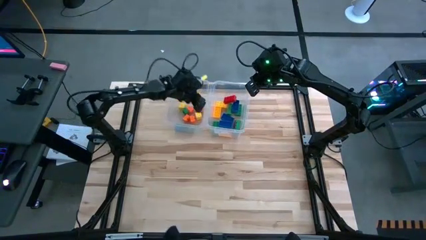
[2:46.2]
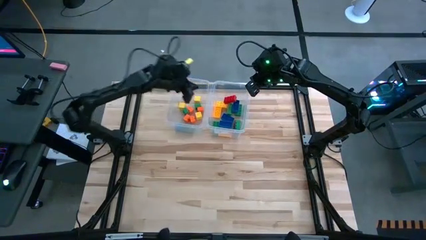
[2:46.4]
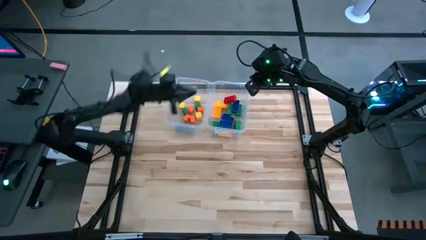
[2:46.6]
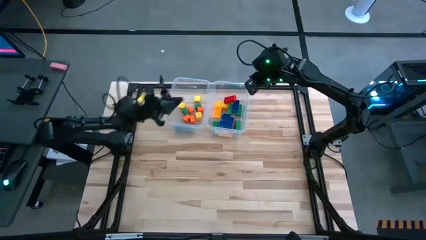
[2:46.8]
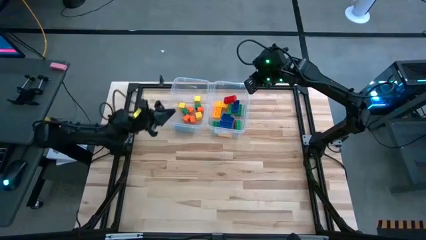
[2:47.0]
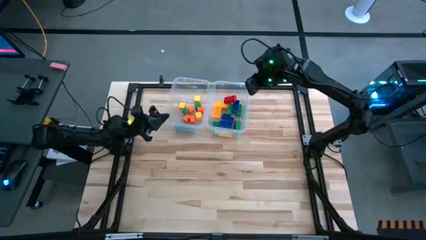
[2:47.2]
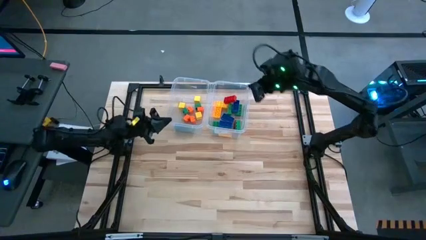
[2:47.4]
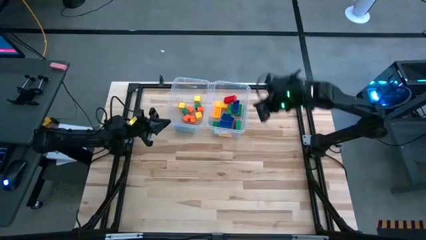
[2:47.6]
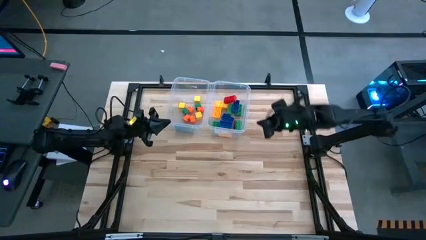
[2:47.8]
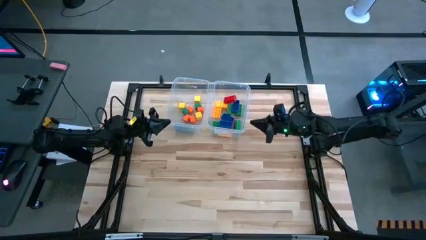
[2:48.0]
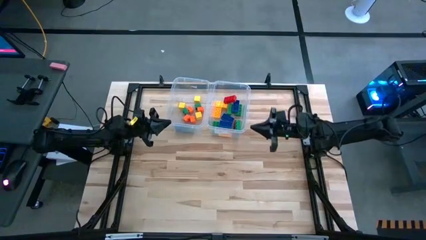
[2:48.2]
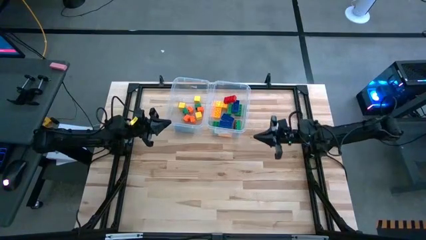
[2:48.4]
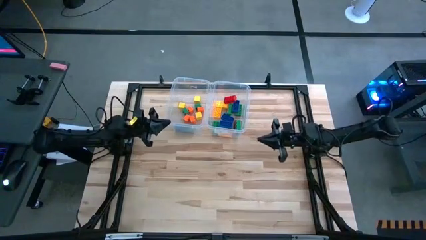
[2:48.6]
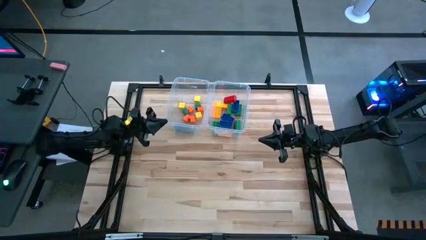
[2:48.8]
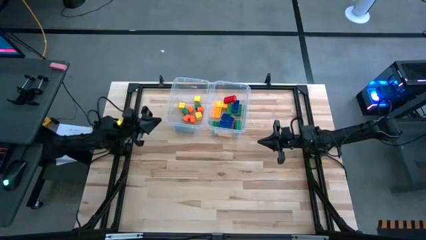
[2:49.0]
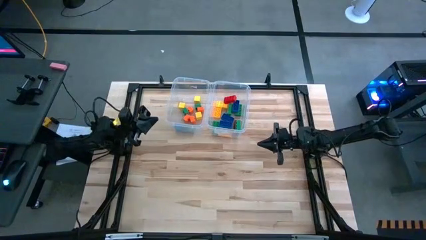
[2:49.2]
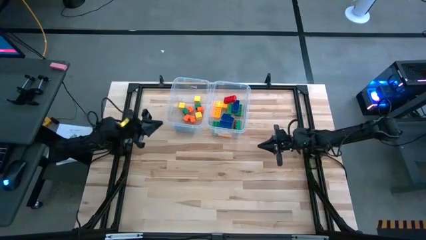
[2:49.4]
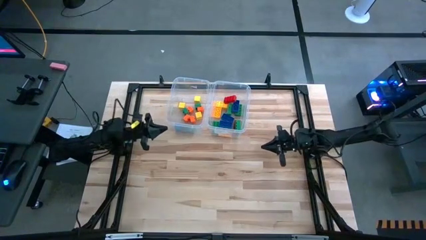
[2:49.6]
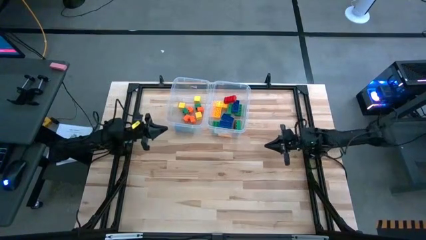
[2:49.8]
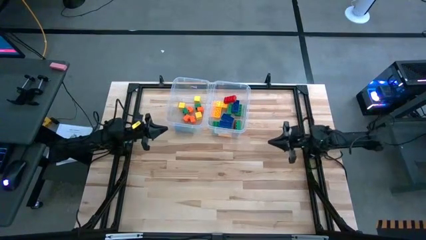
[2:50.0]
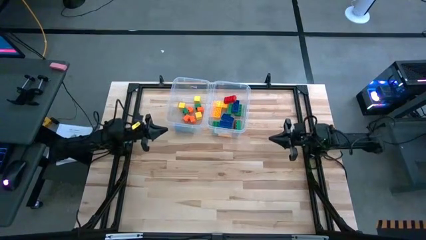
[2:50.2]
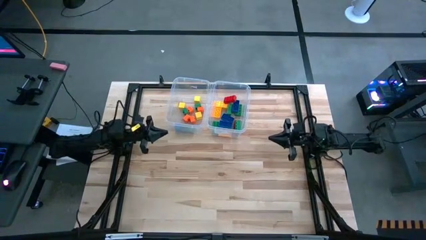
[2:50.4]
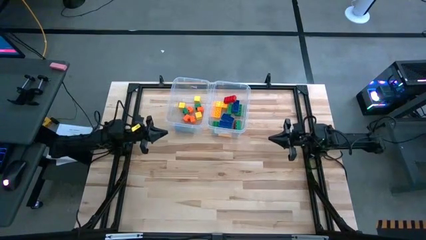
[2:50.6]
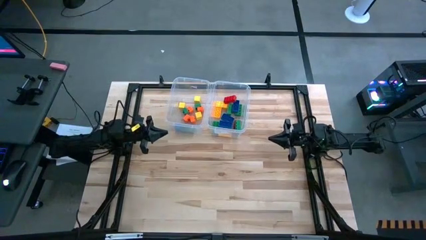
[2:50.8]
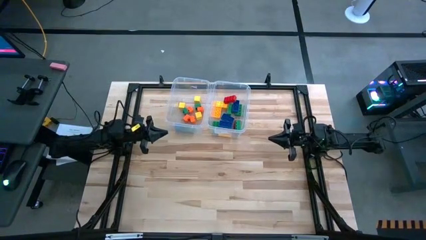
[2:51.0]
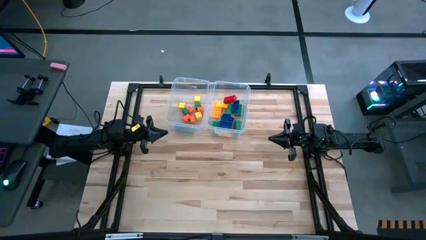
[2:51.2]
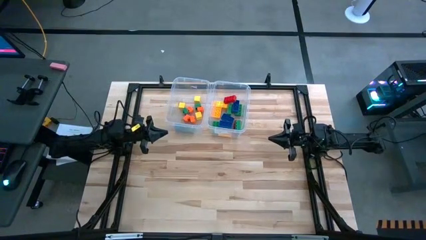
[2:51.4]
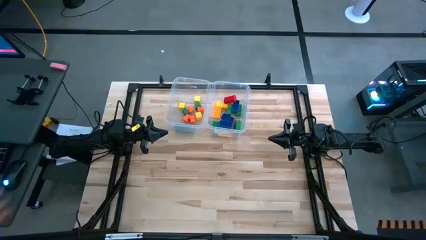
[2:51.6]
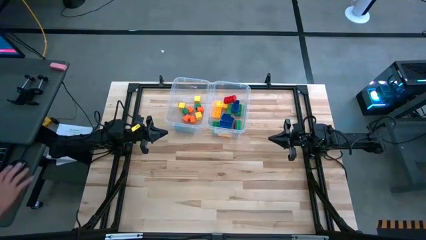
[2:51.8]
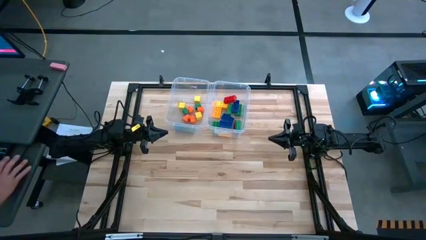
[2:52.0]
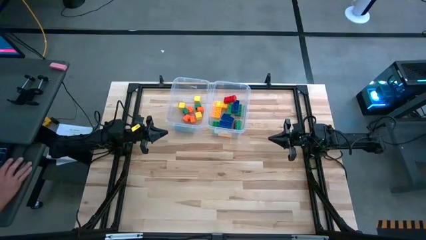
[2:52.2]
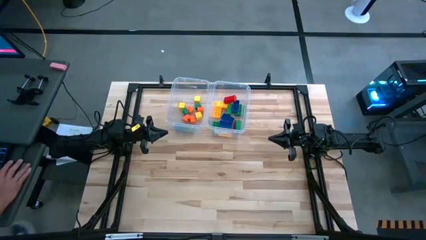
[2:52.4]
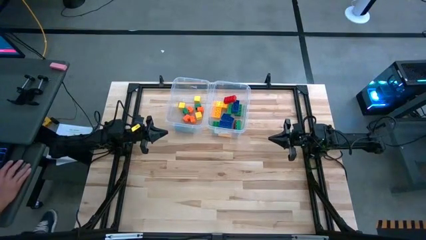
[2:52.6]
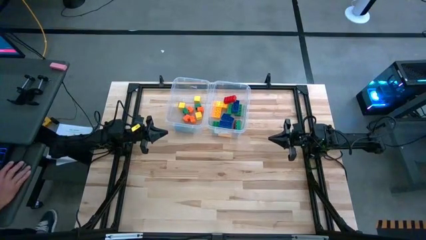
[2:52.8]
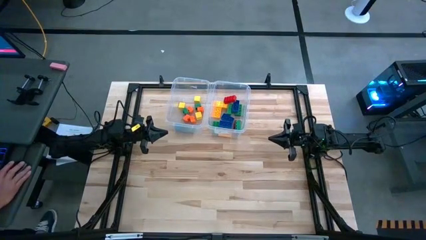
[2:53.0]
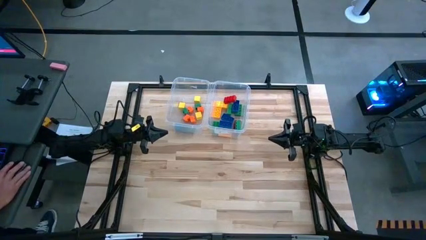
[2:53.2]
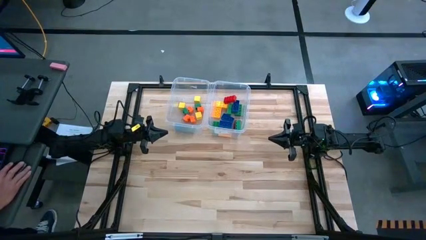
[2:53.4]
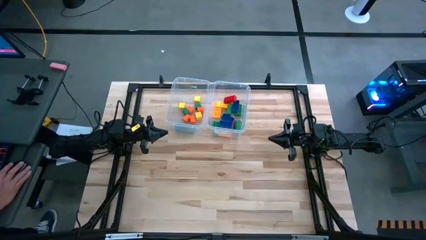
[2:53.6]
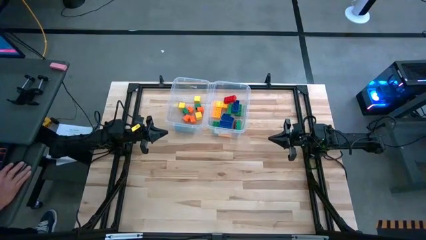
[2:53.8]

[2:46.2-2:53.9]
Task: Sort blocks by size
Return to Home Position

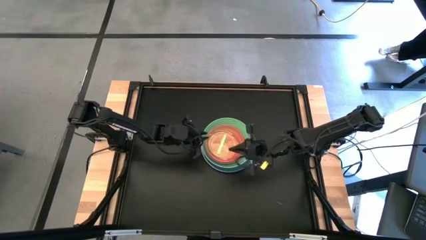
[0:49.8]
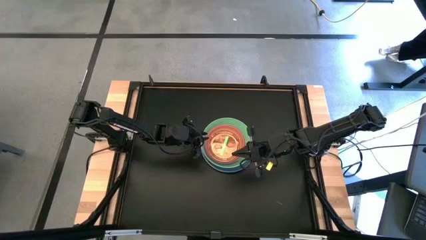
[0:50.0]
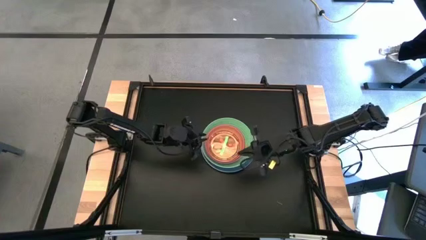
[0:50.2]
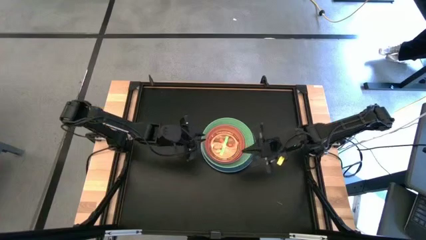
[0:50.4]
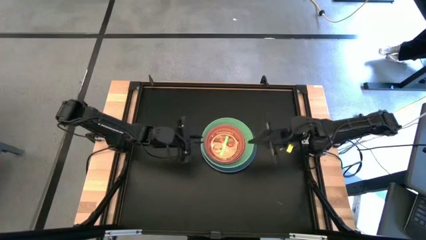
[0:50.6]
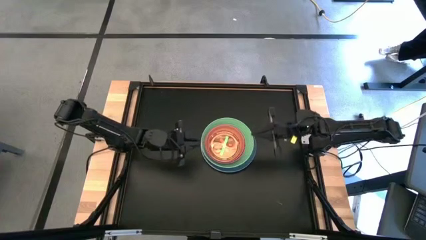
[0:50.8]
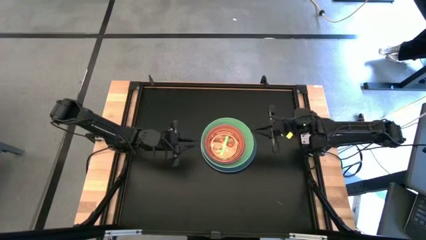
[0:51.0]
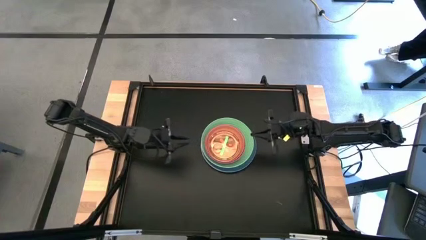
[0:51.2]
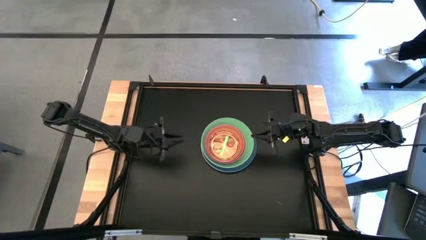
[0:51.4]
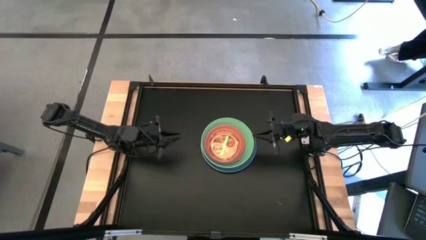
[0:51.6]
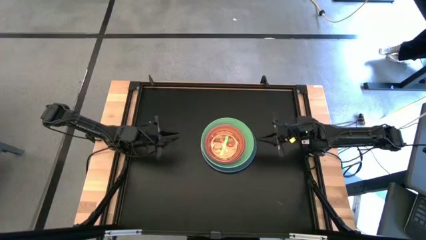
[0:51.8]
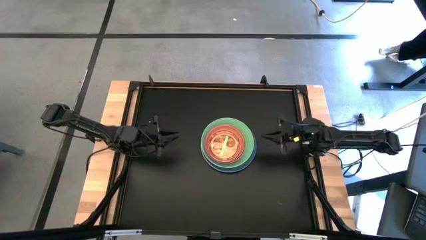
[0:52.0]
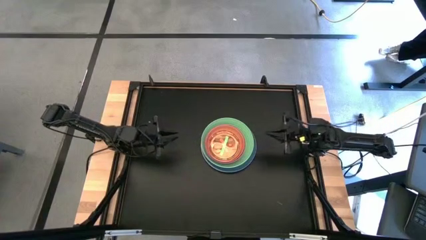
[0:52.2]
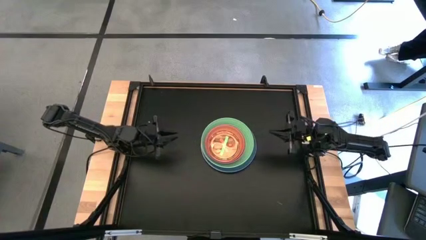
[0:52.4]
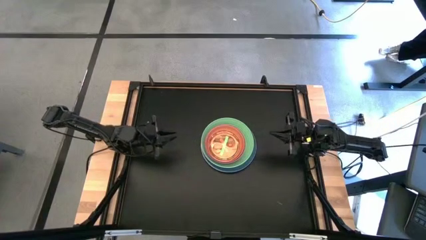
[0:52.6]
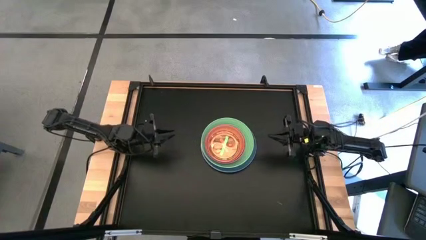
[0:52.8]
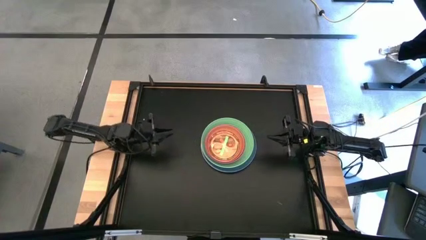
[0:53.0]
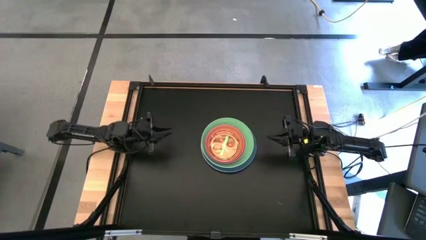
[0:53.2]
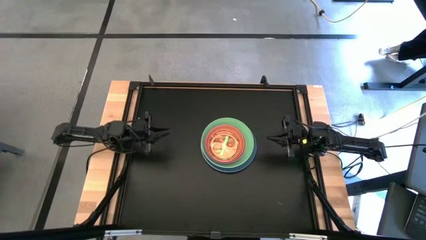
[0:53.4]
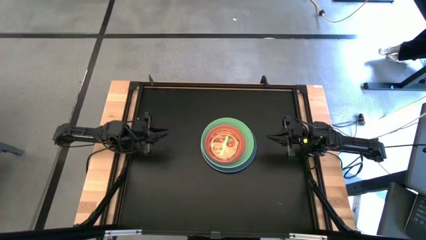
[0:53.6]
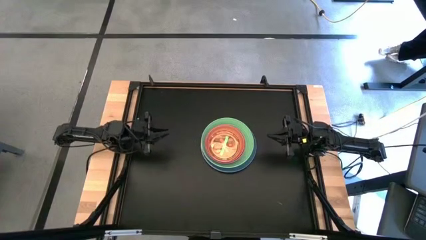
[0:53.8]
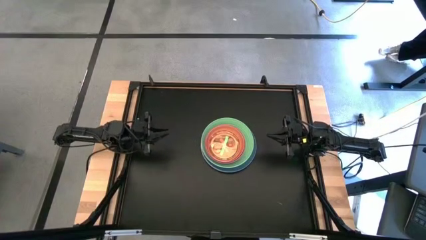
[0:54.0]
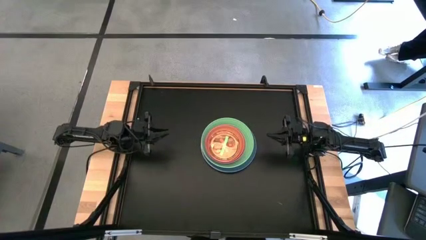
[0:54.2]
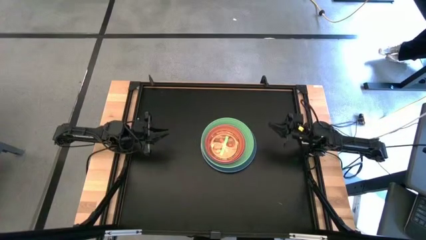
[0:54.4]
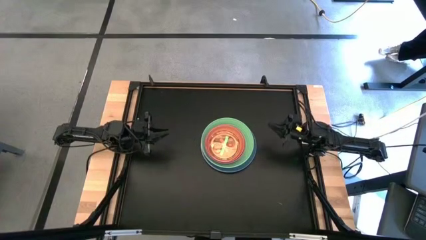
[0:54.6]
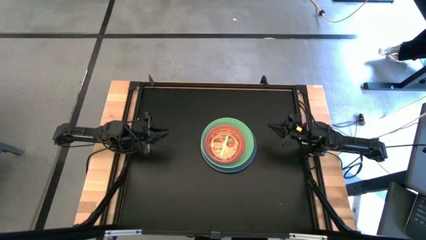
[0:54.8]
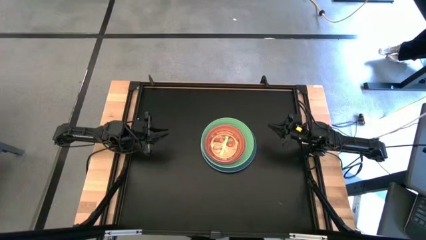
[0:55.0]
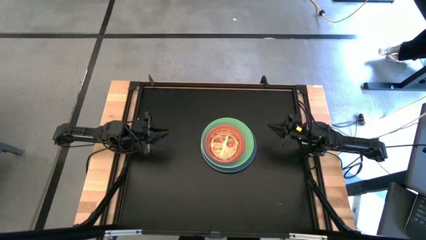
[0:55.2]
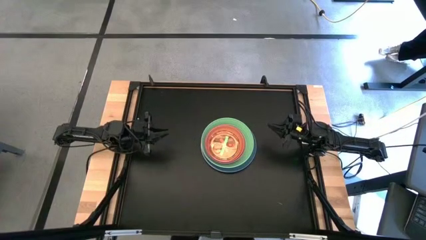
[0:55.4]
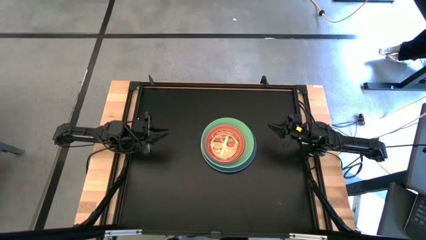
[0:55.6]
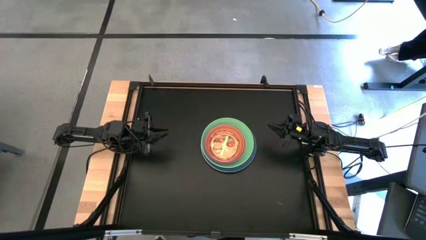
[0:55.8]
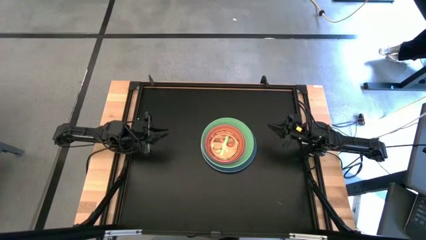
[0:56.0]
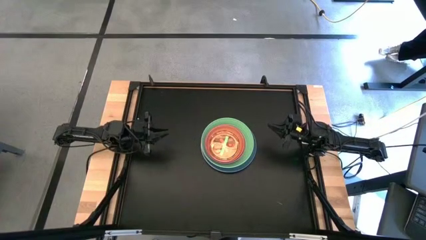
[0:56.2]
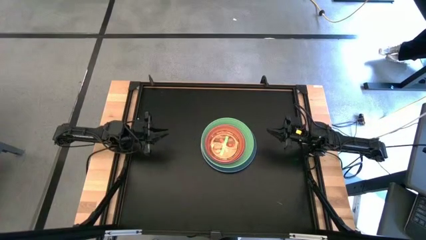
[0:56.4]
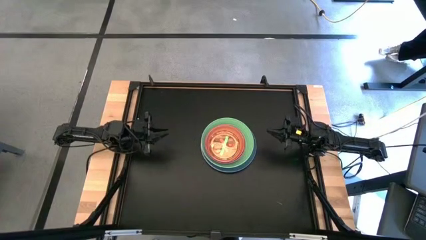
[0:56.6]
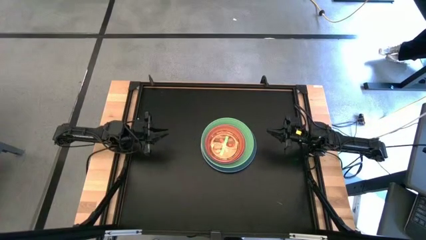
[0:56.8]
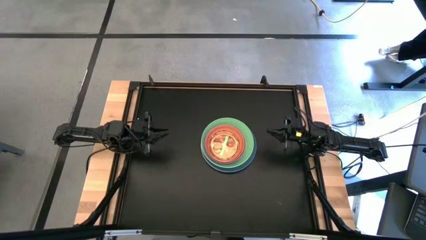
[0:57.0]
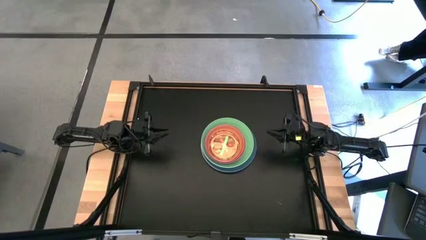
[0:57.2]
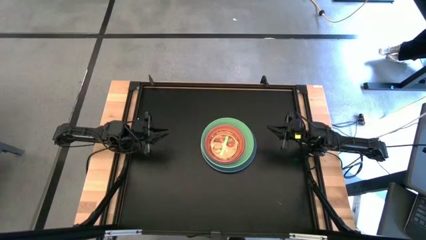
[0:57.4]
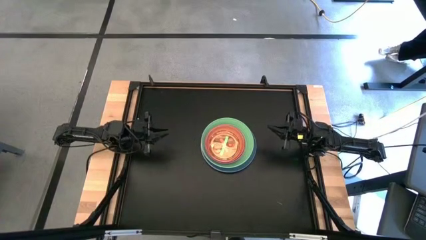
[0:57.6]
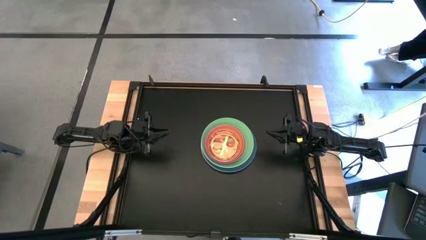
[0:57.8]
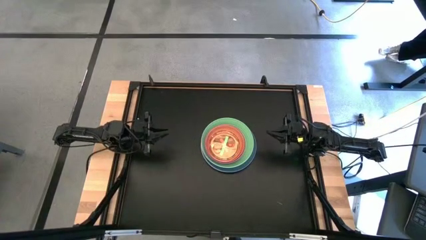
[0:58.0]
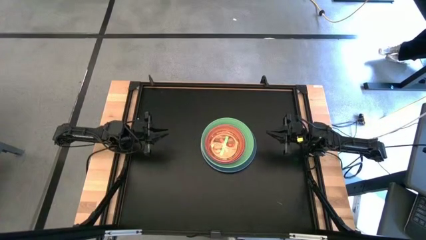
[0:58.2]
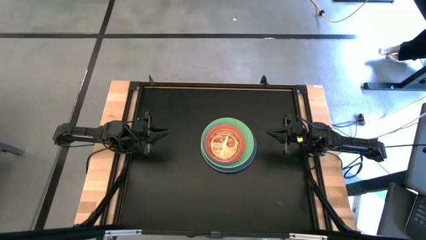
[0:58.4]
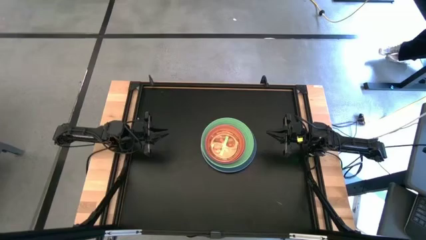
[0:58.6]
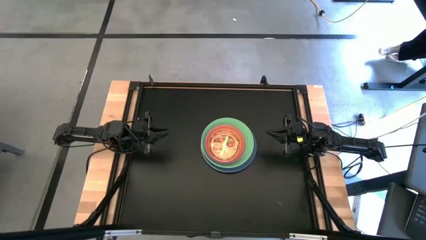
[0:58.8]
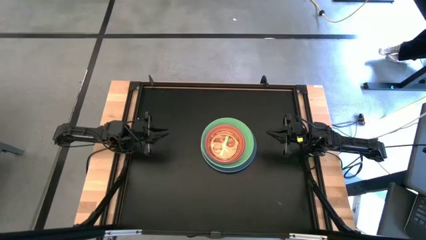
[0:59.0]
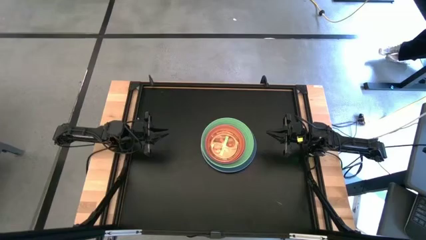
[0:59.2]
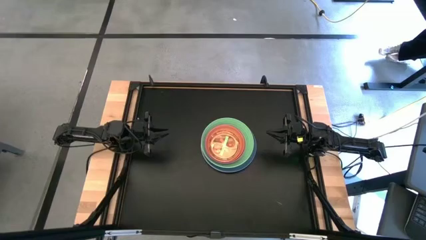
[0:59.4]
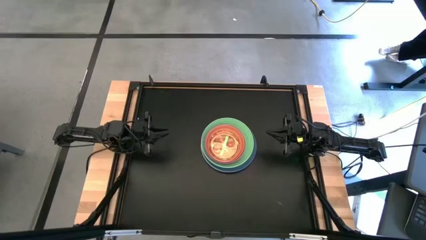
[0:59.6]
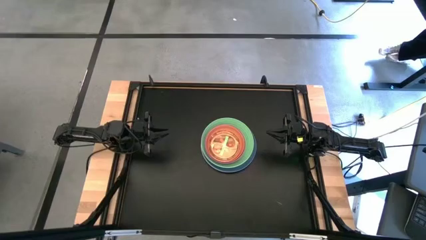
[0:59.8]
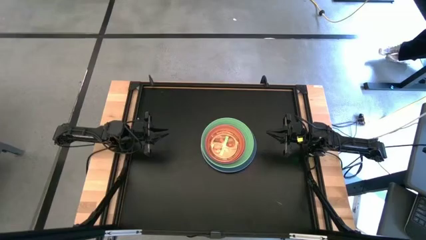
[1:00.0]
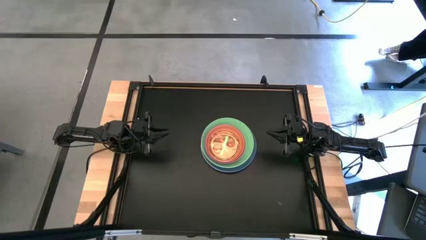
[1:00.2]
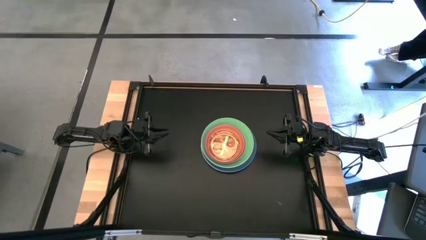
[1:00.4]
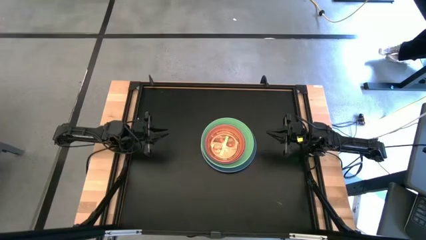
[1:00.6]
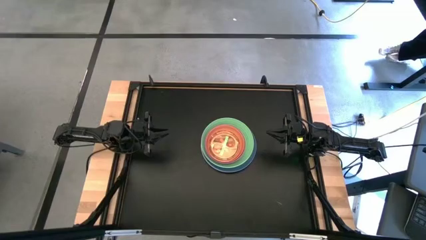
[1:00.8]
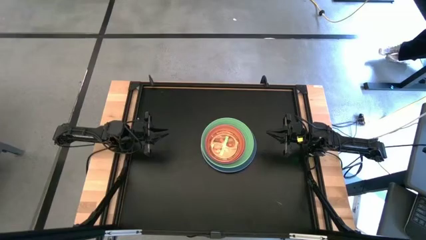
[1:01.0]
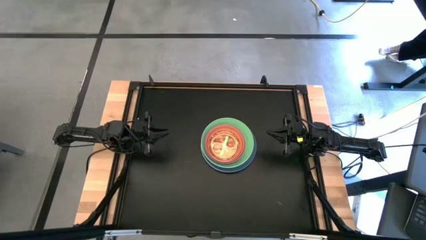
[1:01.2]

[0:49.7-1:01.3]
Task: Stack plastic plates
Return to Home Position
